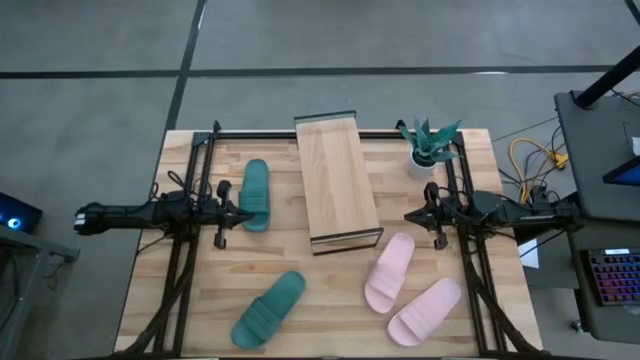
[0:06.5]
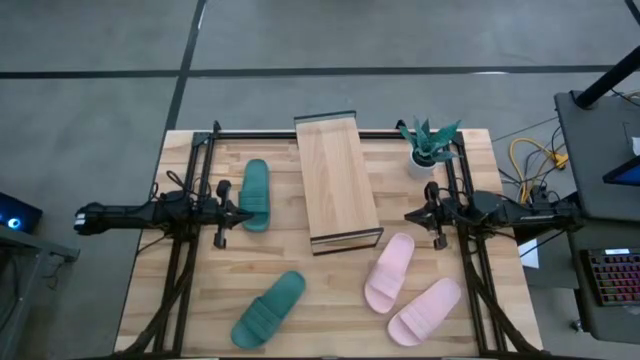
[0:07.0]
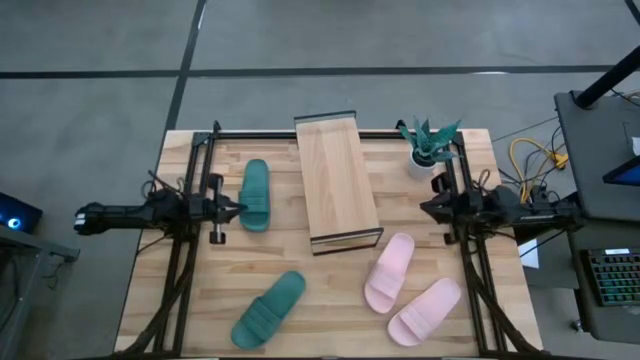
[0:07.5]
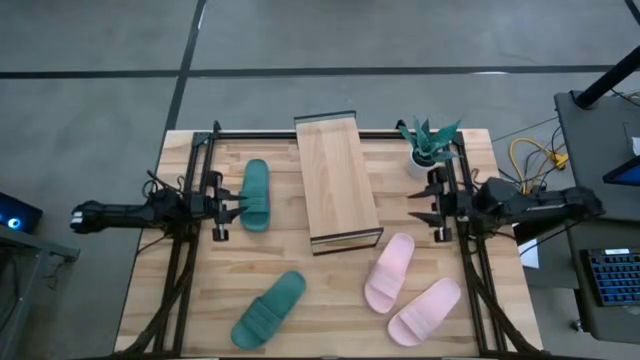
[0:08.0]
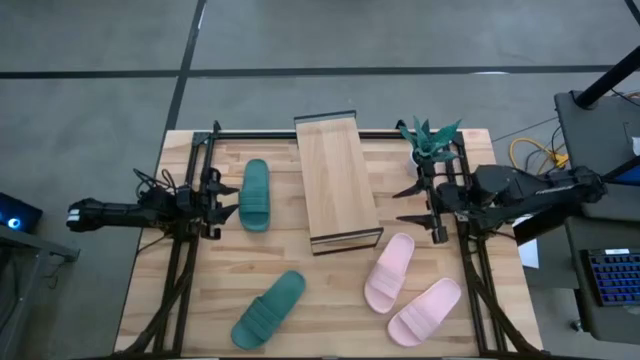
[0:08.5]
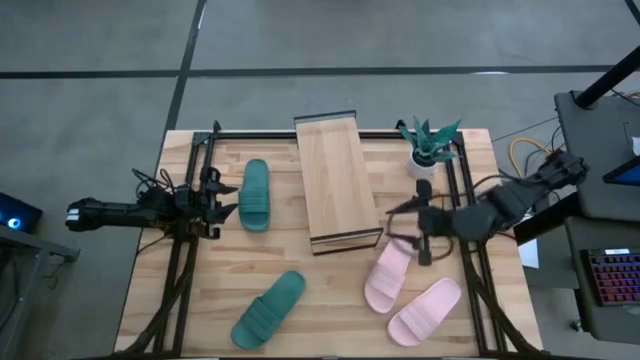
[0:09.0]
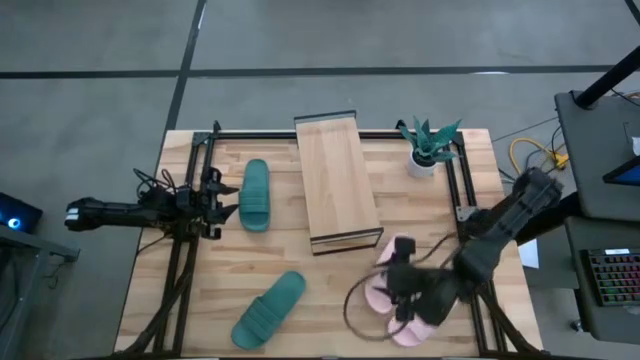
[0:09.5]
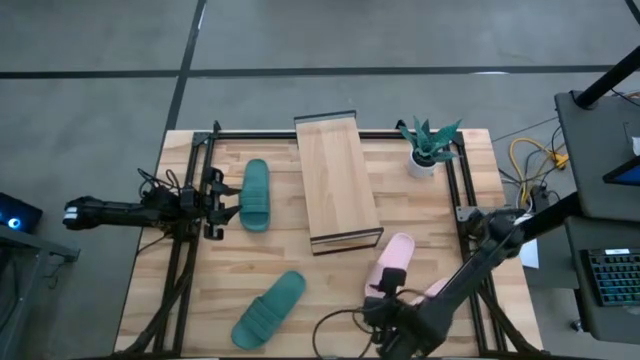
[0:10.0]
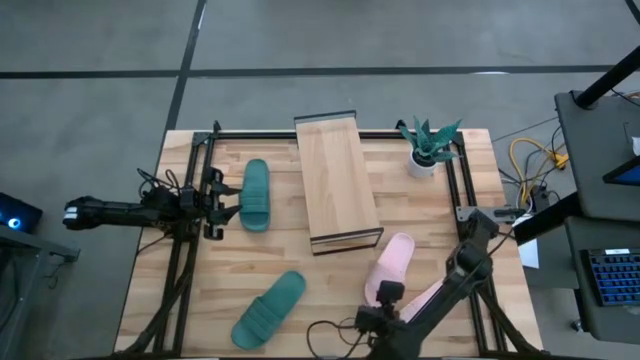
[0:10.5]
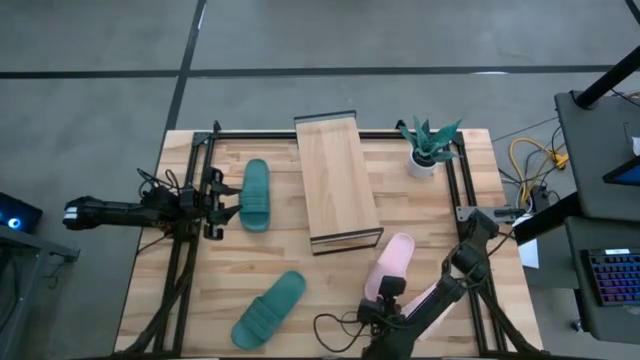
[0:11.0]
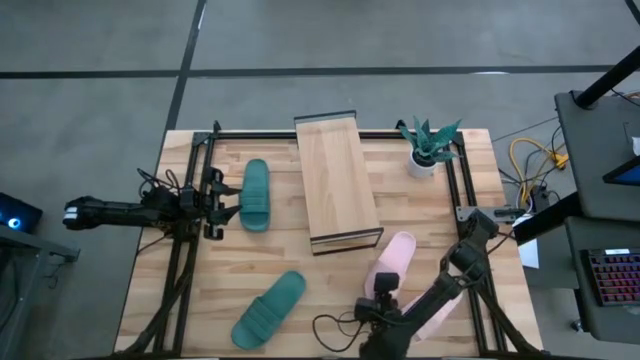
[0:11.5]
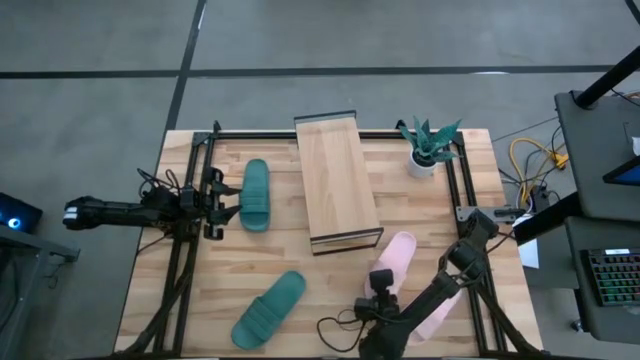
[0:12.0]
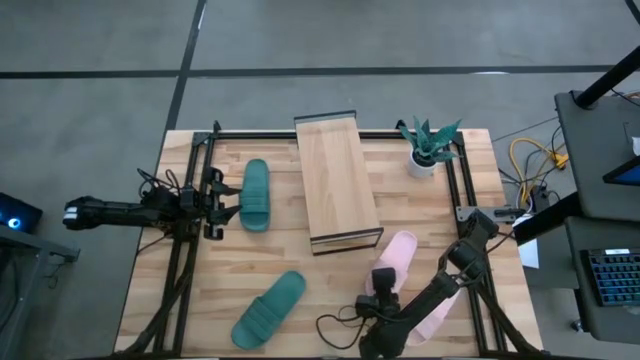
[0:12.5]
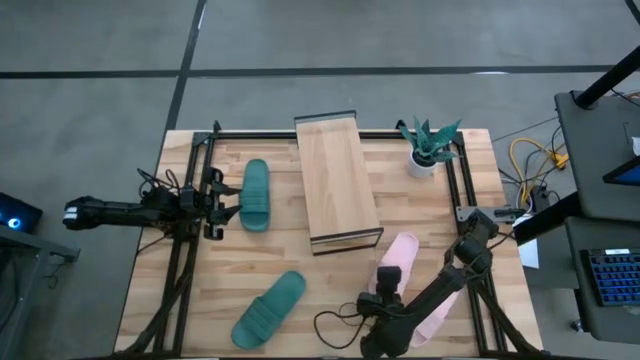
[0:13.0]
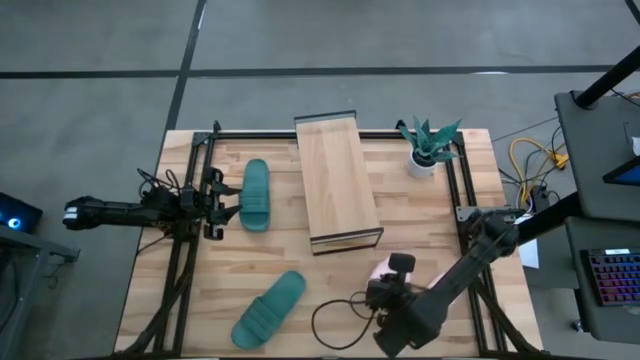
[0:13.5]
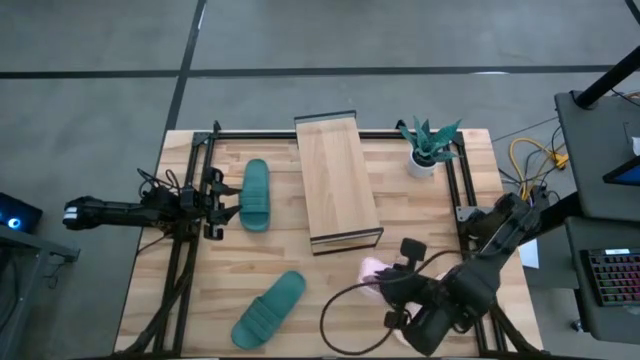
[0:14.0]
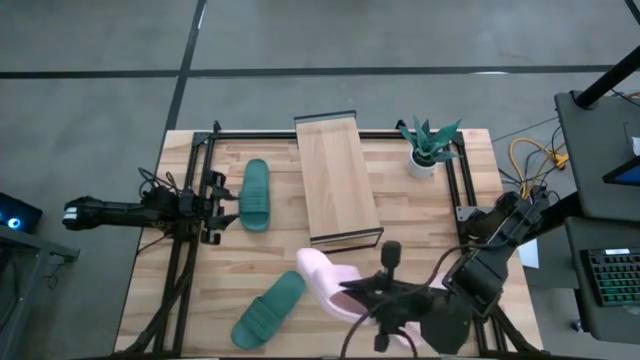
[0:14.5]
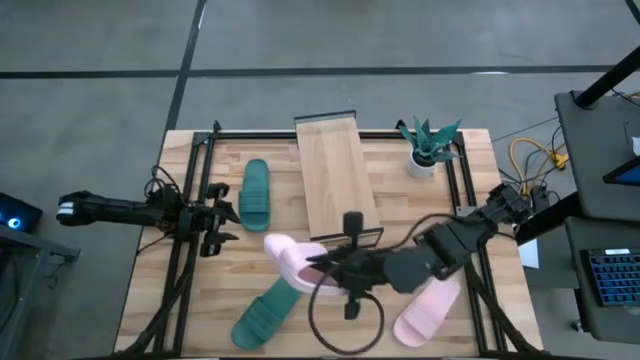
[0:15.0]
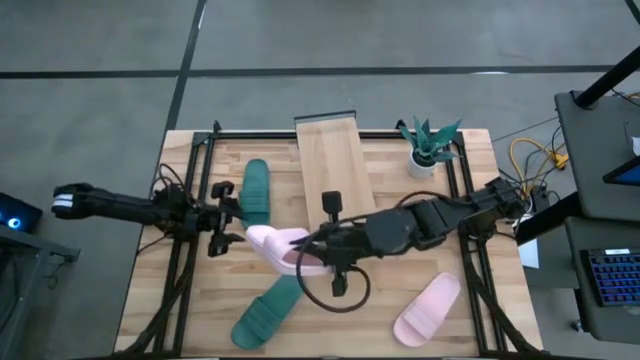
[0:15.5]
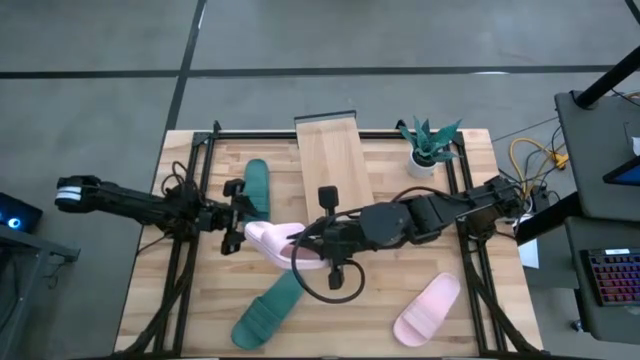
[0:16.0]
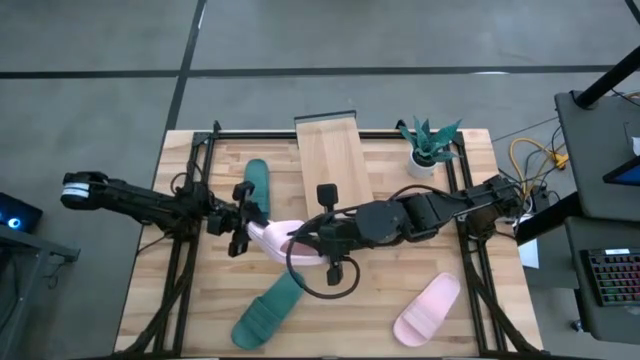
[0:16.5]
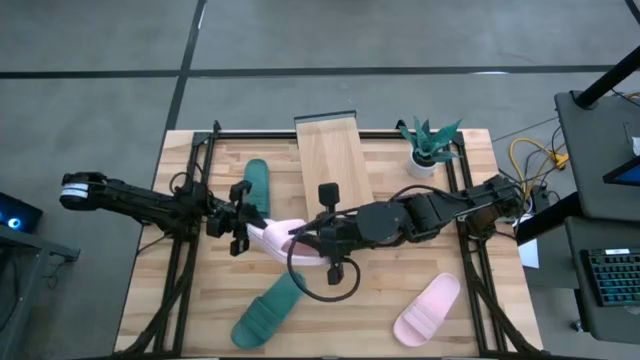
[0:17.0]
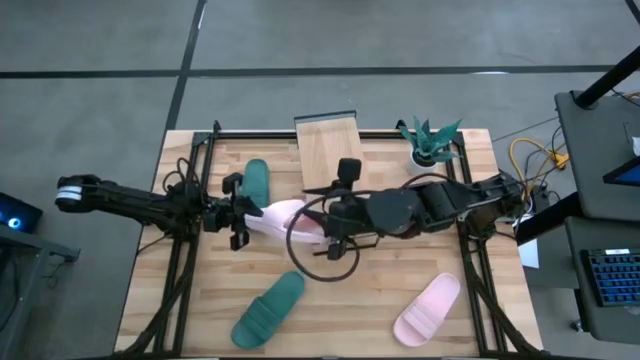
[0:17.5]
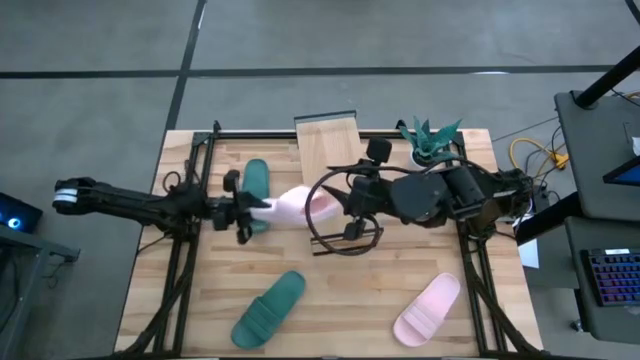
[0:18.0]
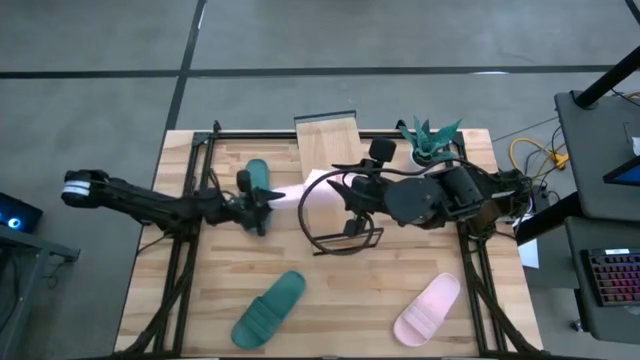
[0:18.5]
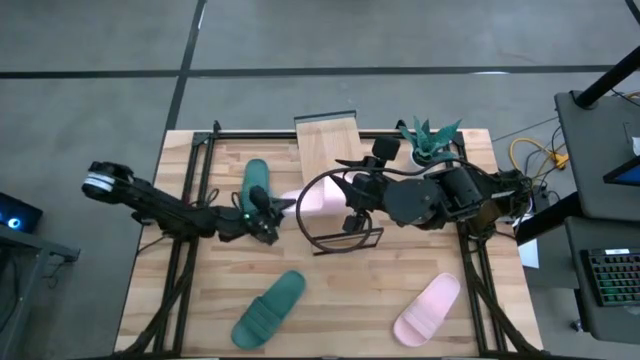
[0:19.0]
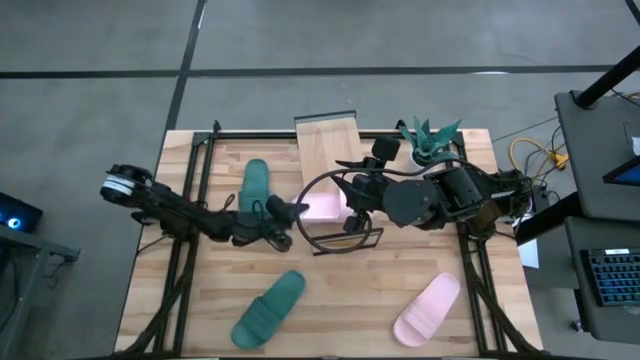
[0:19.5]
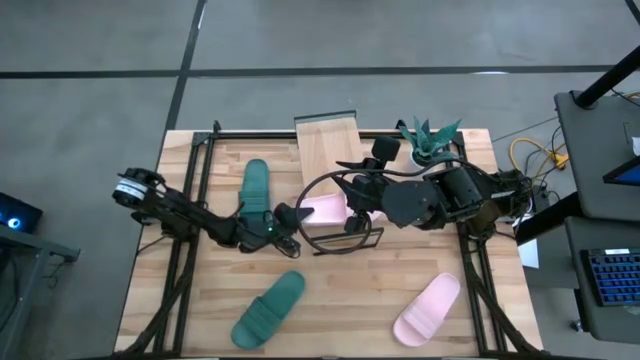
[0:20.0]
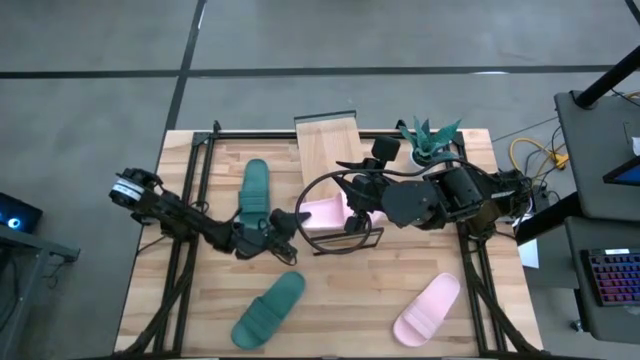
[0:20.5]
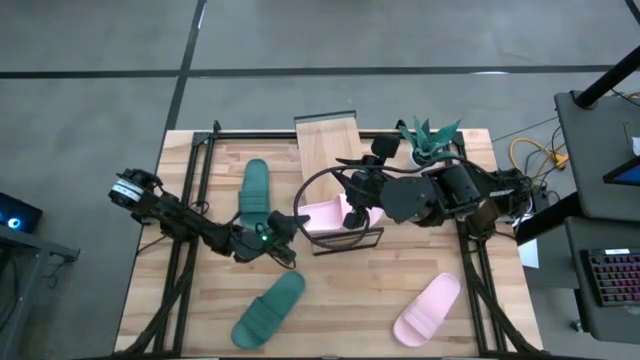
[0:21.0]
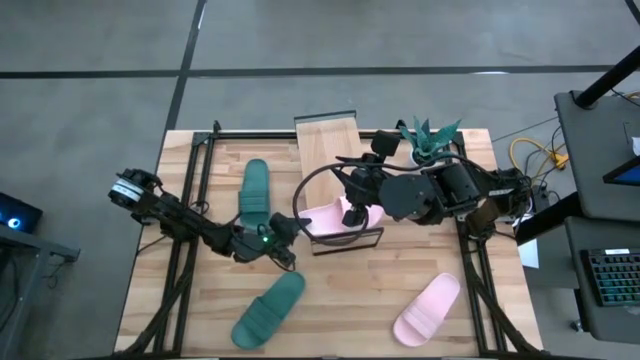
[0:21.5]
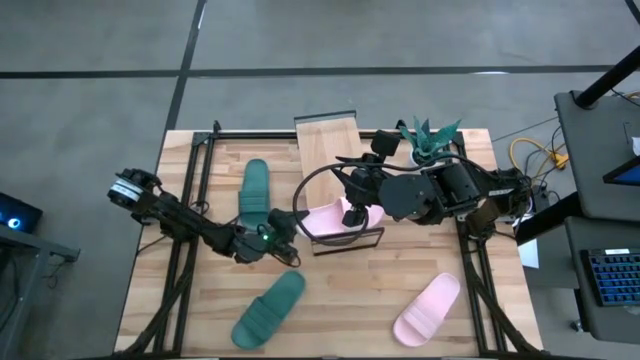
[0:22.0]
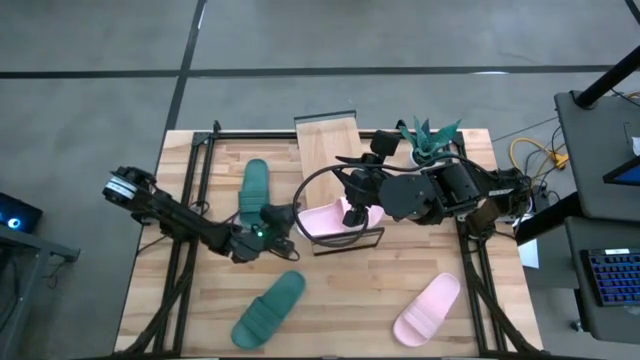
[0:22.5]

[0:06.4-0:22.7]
Task: Pick and place slides into the shelf
Put the top pink slide on the shelf
